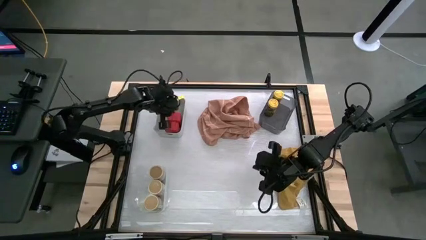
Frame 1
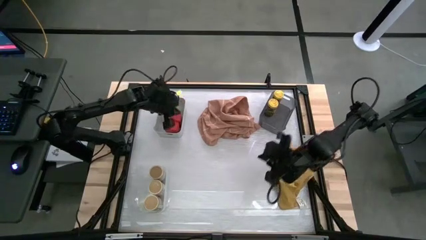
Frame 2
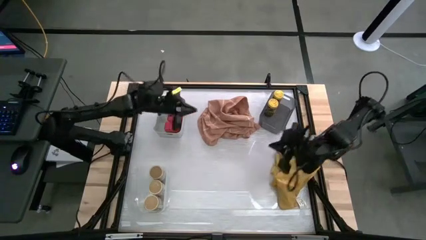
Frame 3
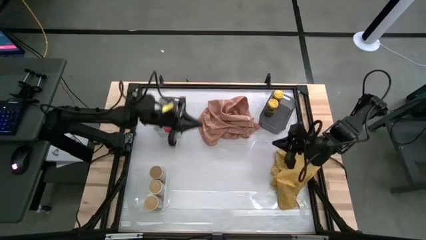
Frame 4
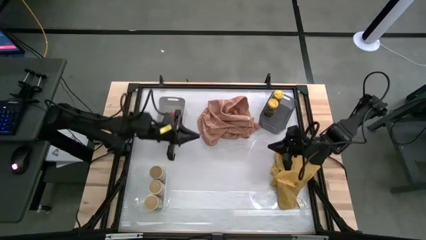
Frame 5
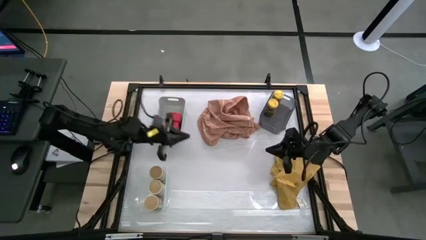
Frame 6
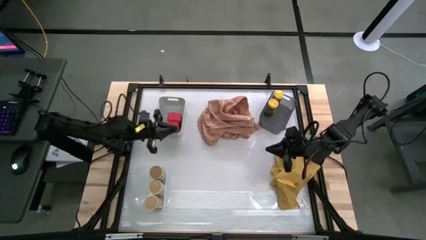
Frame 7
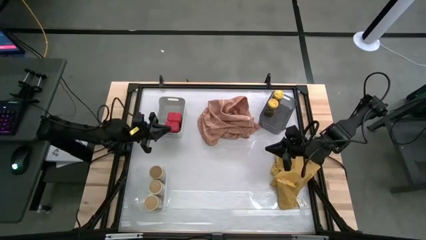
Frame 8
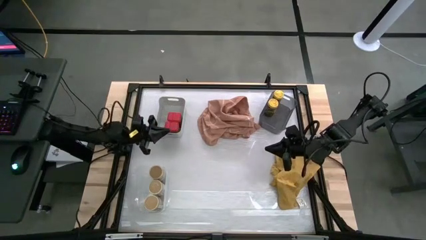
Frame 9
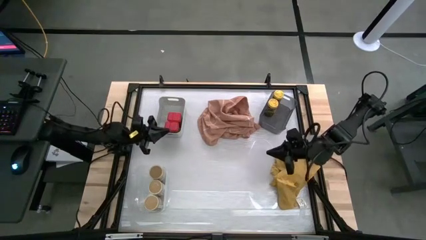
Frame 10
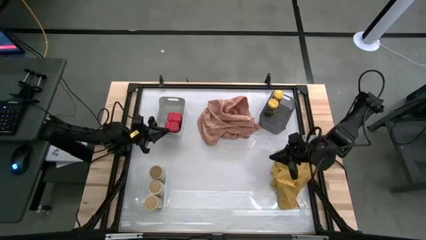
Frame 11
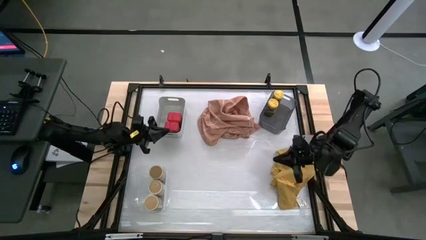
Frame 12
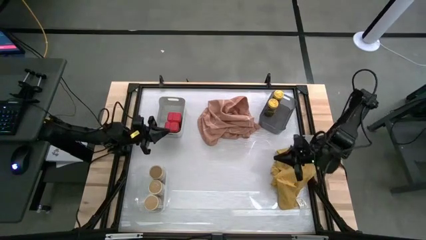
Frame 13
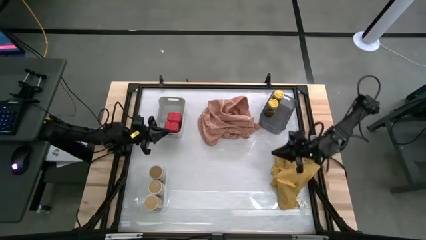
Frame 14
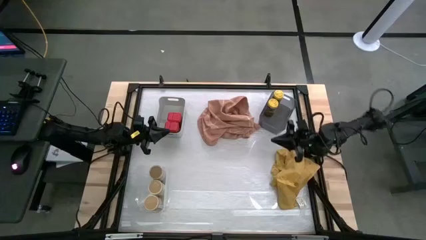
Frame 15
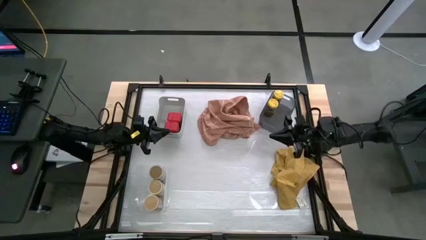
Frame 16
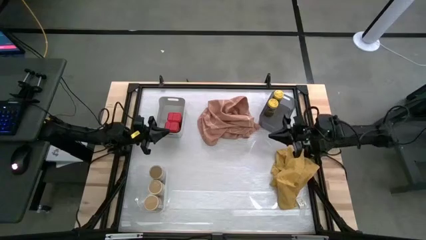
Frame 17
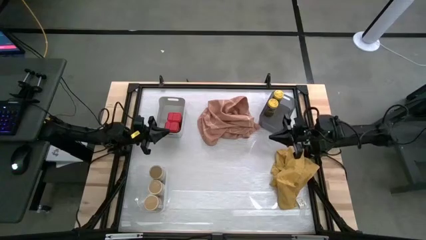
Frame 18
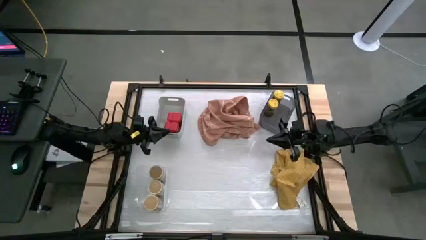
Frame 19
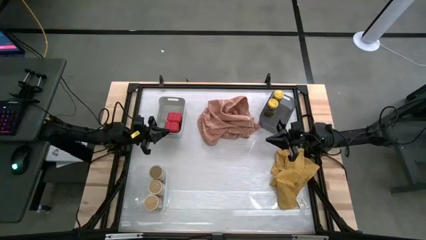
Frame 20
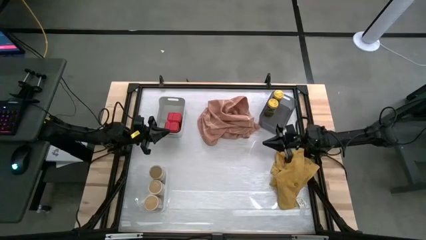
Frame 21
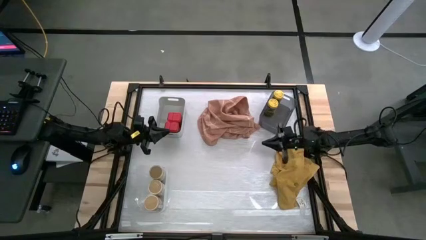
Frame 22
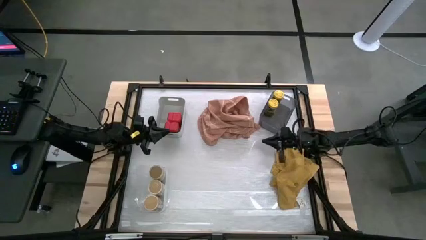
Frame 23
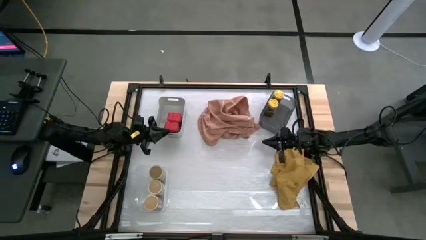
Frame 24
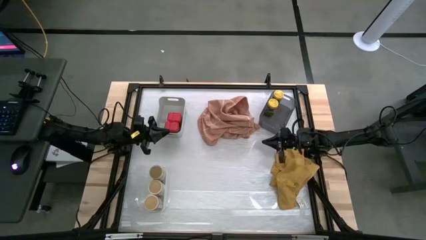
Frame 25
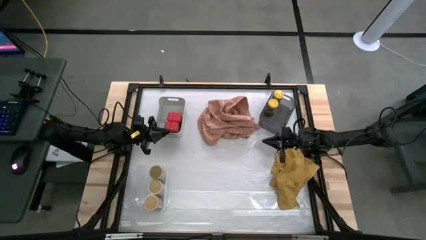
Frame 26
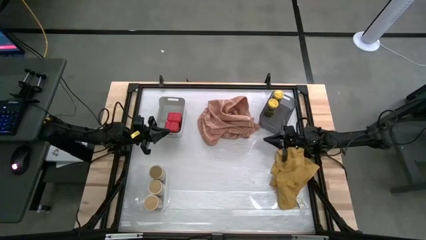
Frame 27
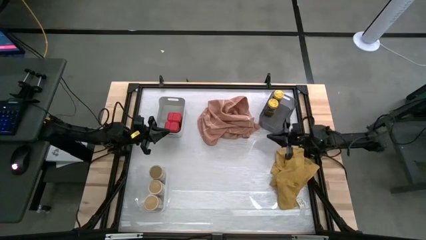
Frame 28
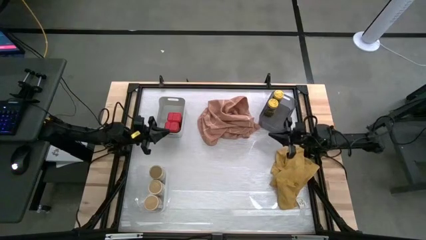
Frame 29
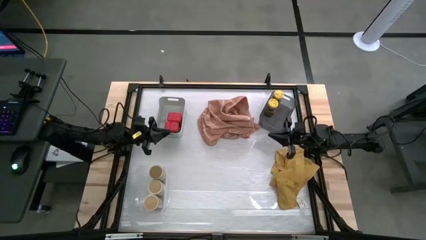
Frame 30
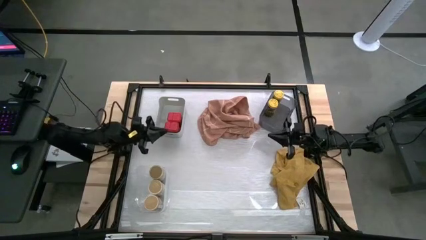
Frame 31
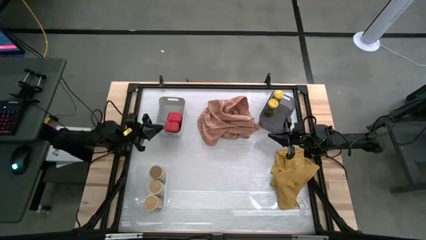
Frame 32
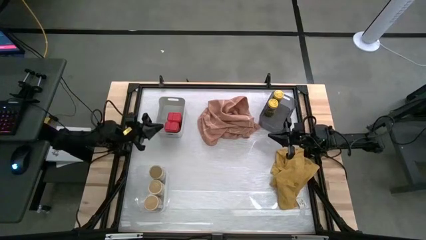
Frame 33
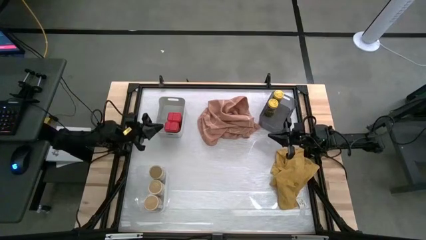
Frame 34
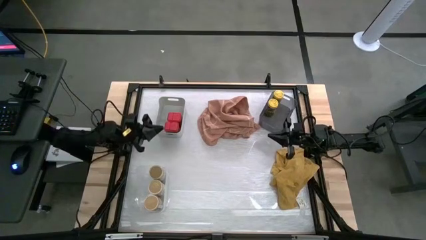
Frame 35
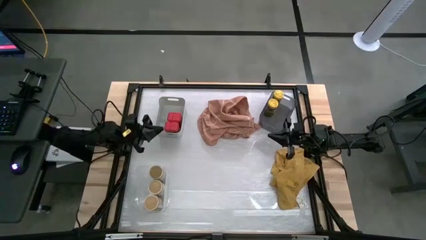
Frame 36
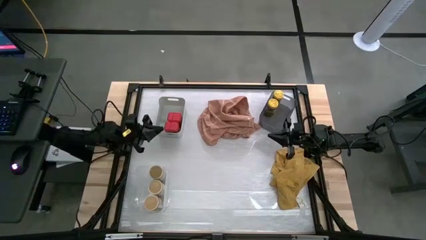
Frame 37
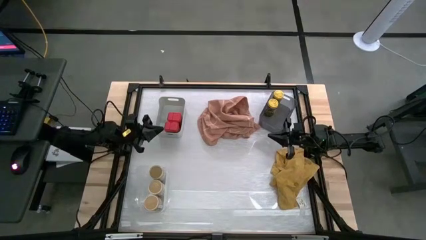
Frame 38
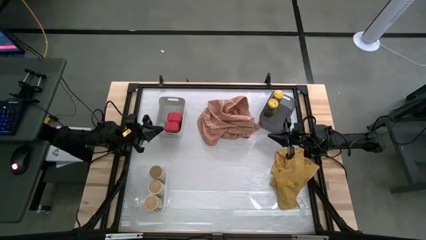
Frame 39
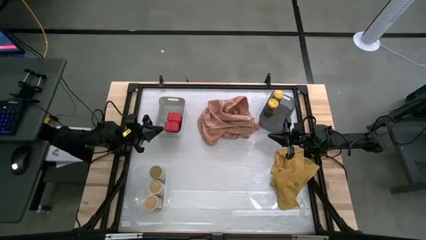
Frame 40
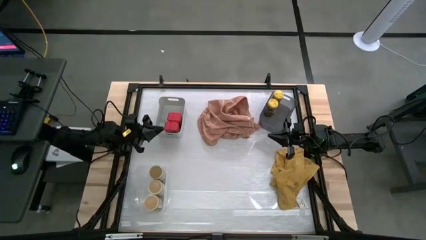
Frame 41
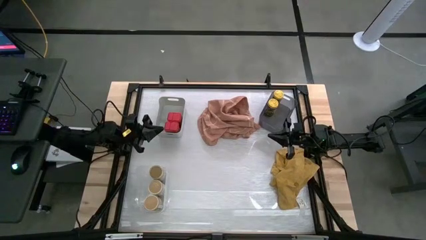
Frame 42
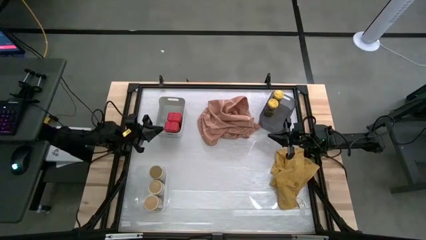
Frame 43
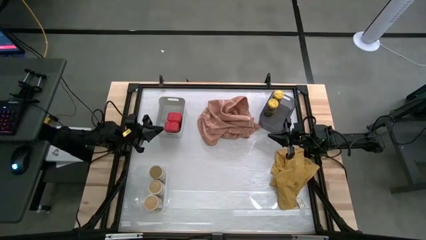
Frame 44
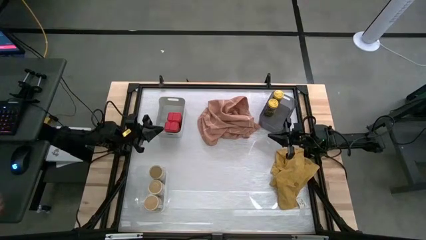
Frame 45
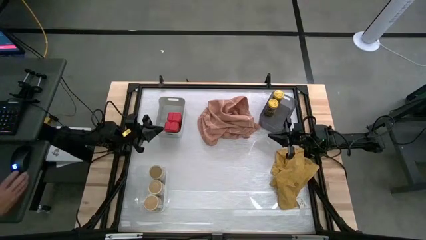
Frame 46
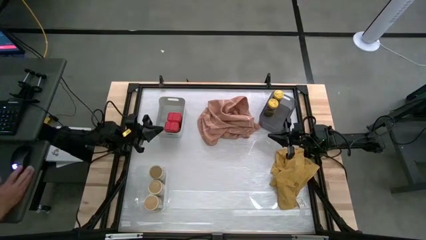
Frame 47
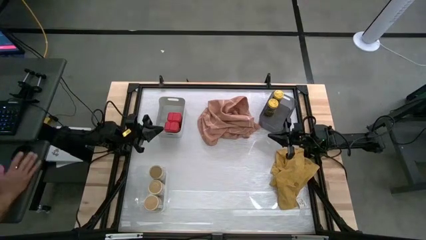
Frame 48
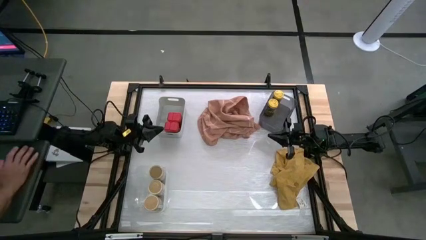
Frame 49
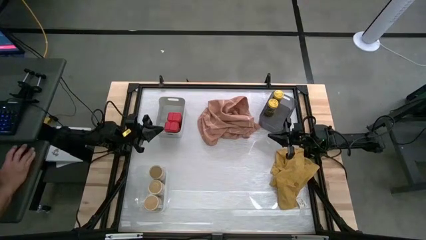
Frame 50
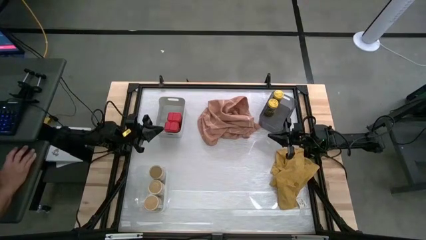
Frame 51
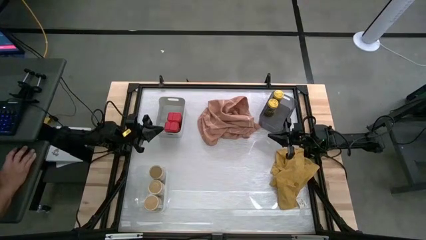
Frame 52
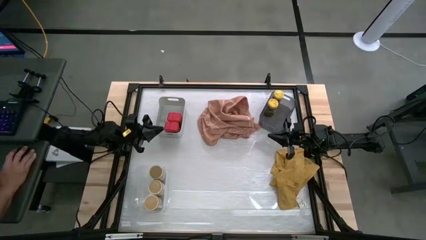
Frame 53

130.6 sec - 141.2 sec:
Task: Sort spices by type
Return to Home Position

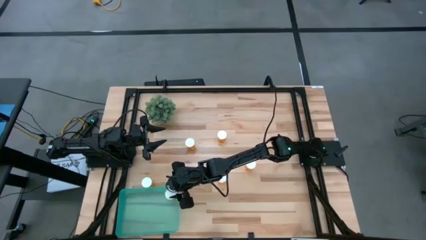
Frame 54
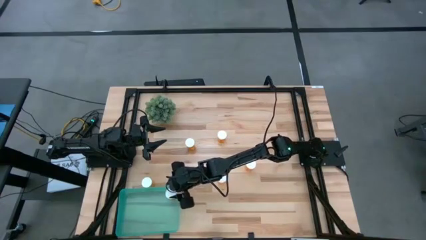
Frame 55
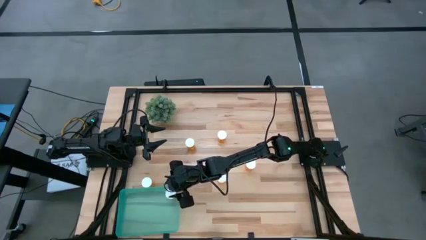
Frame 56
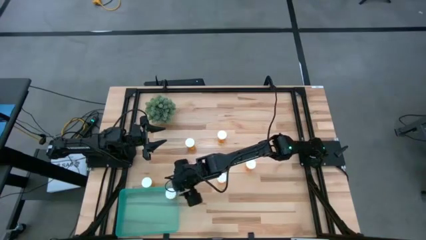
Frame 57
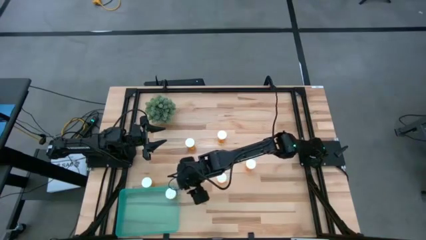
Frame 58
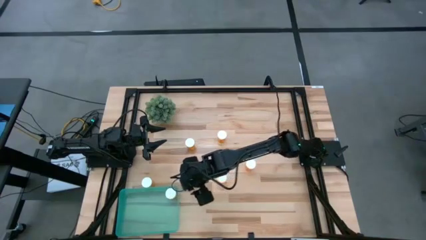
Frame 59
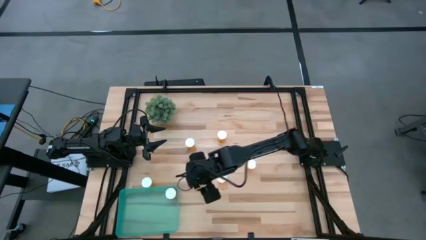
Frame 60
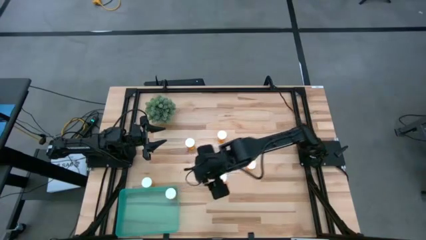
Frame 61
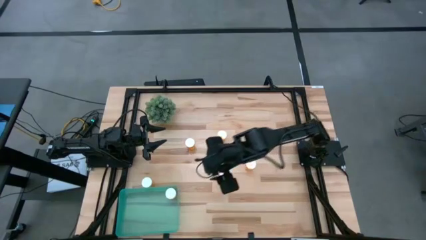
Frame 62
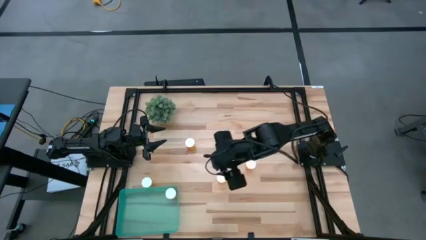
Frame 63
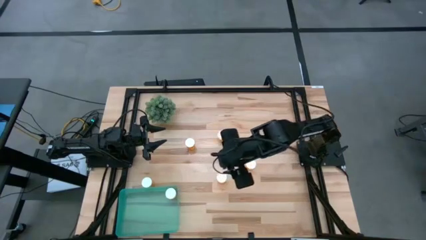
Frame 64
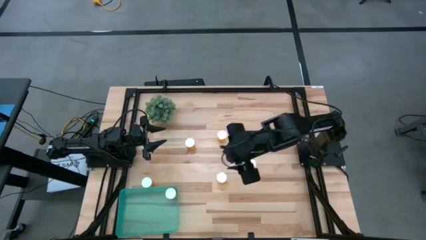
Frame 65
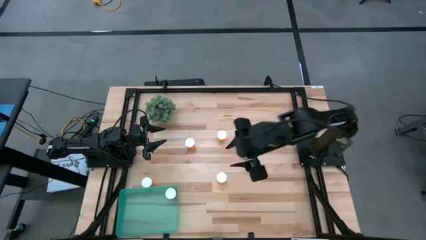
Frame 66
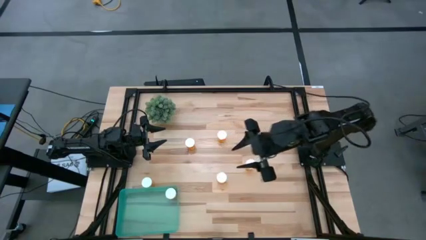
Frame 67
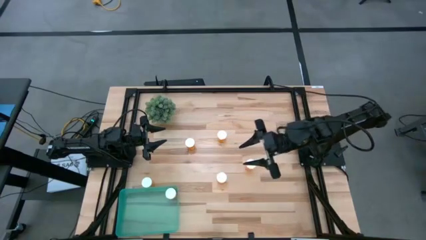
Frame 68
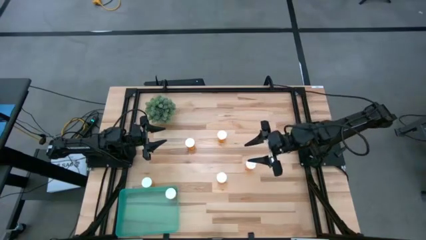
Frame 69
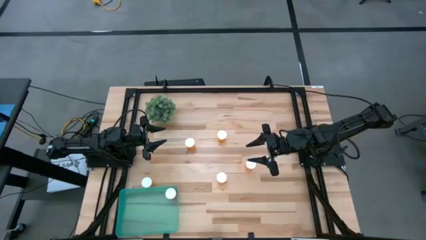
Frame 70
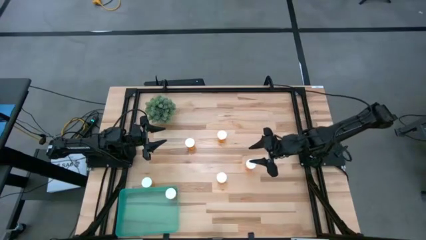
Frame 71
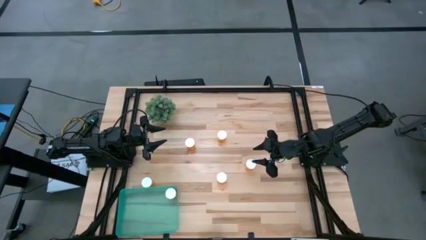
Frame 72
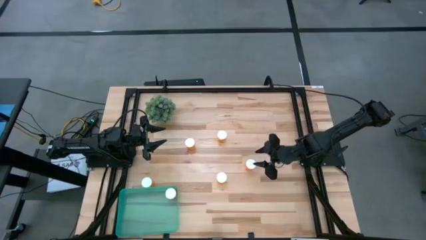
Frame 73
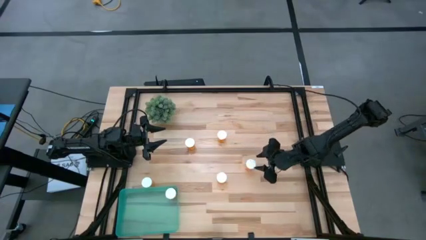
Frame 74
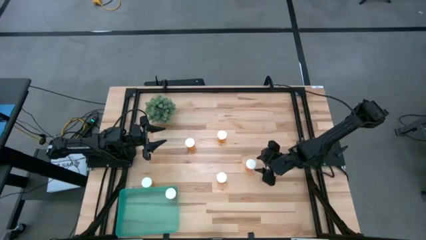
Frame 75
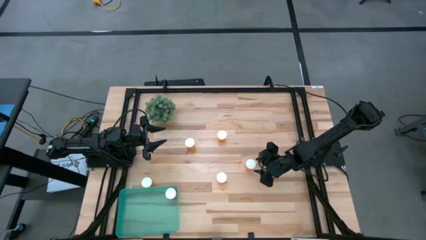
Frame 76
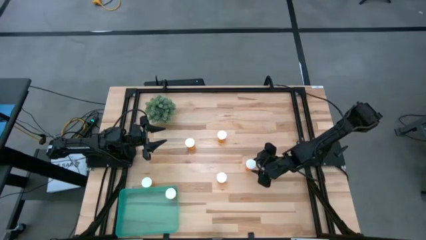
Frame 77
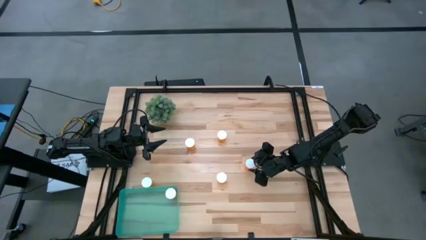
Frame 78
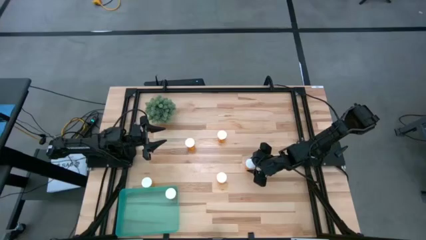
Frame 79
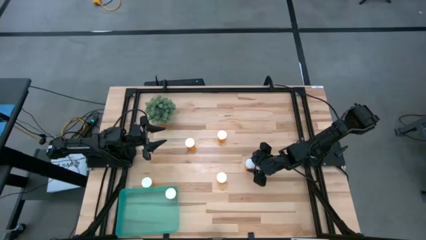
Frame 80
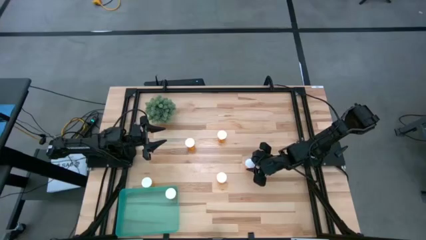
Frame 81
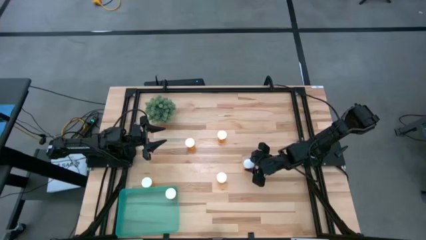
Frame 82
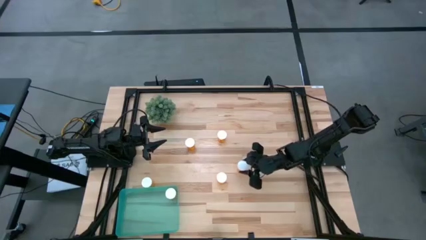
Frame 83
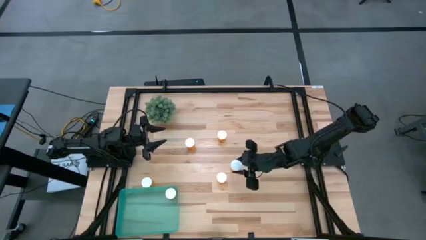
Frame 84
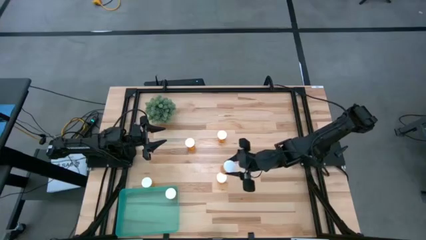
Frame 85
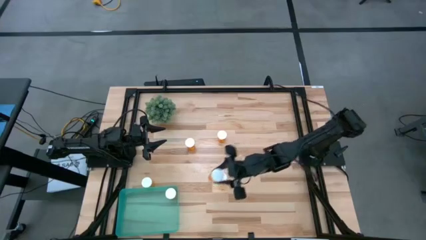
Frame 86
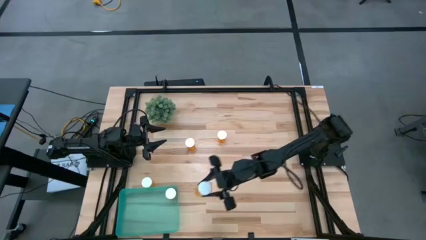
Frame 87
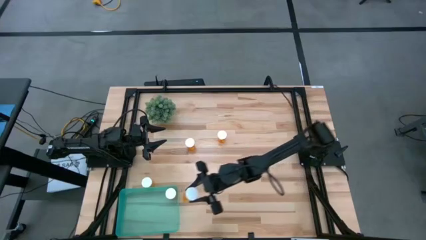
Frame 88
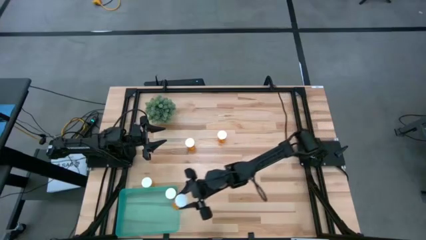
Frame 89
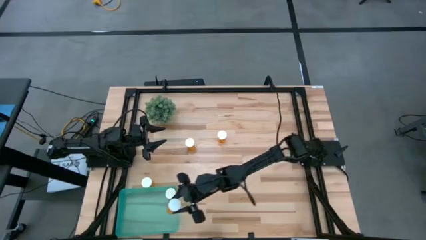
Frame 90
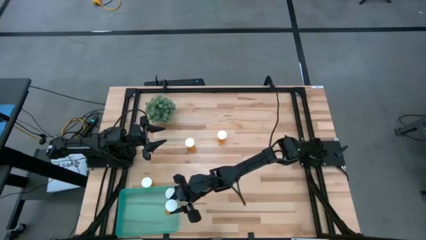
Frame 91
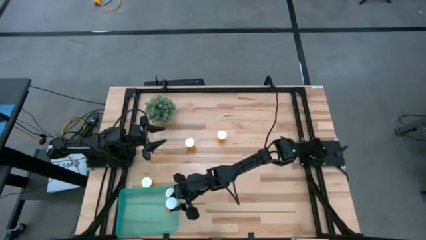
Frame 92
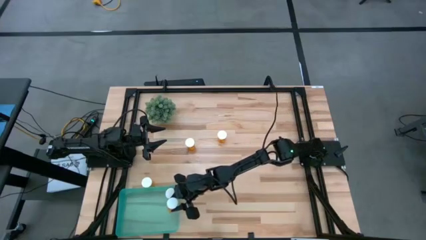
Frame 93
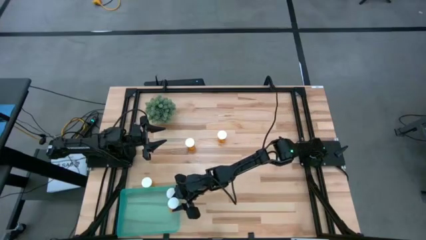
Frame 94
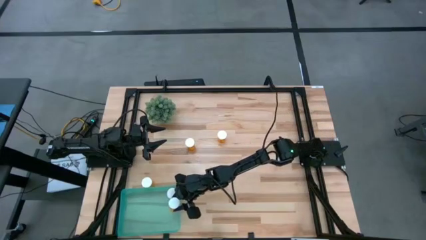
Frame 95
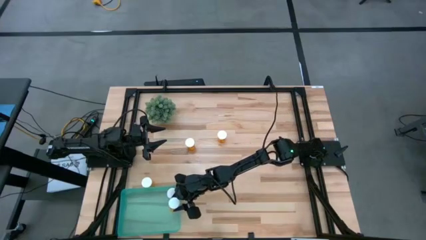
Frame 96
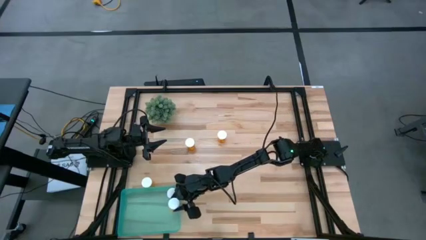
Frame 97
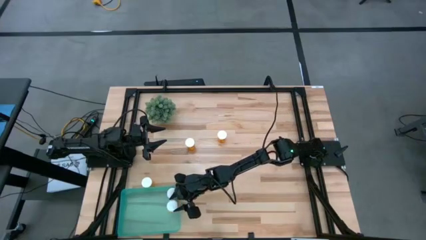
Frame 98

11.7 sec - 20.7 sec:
Task: Pick and place pill bottles into a basket
Put the yellow pill bottle into the green bin
